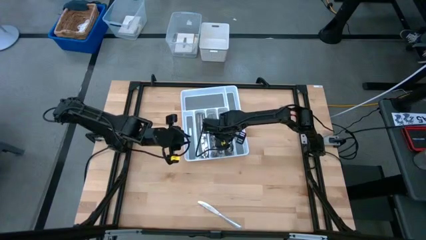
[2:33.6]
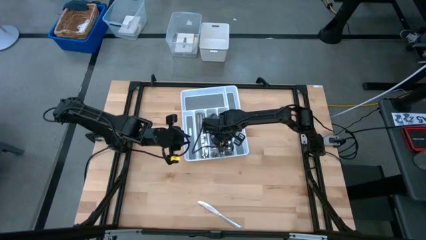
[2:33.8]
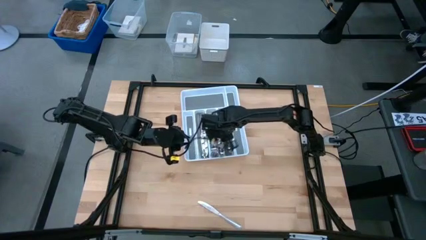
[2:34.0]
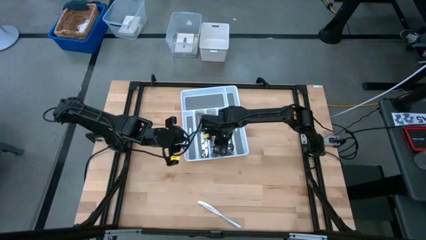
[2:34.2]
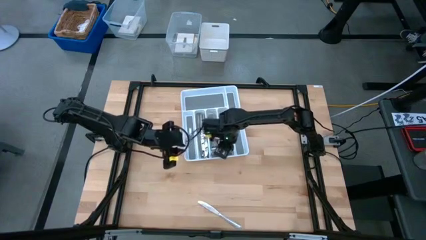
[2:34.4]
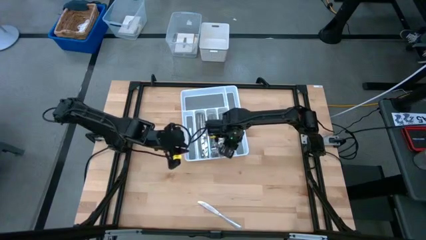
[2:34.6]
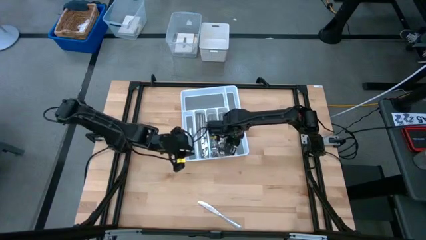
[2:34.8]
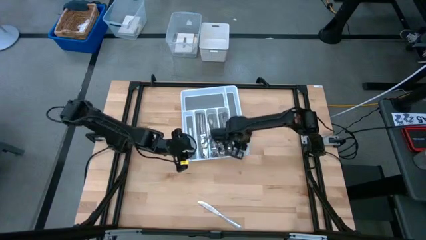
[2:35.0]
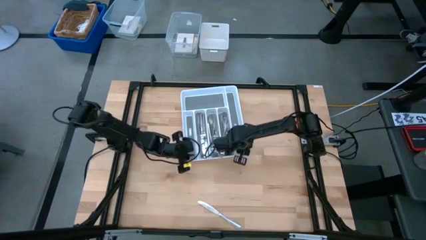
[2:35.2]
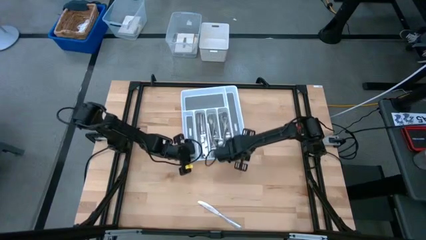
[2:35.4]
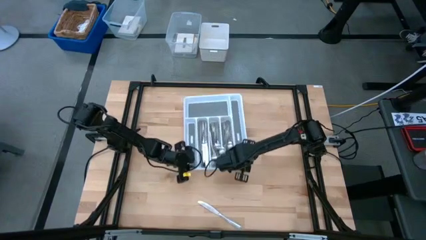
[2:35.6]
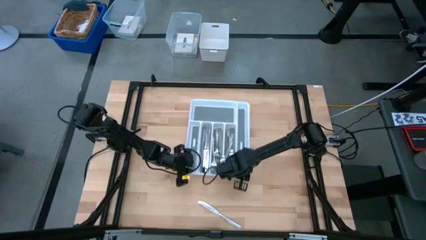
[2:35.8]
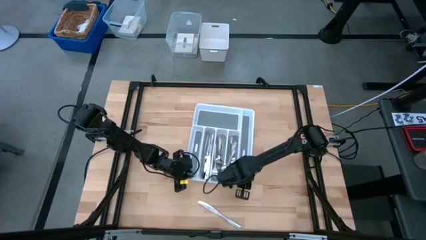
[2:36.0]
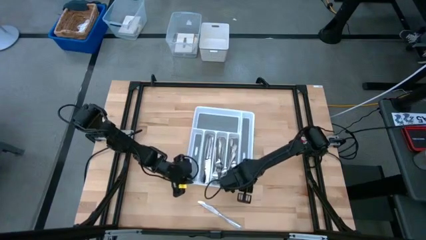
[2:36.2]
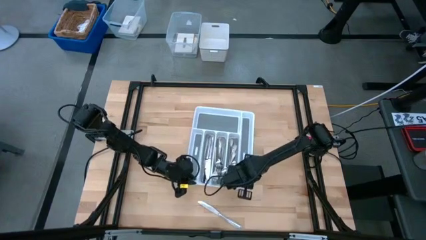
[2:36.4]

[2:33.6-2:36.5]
Task: Sort silverware
Adjust the white cutlery tray

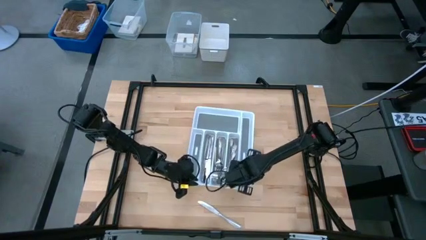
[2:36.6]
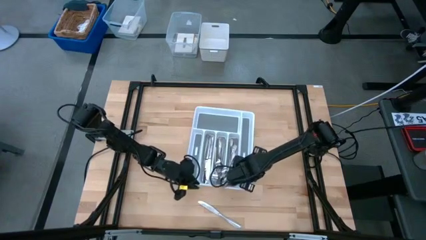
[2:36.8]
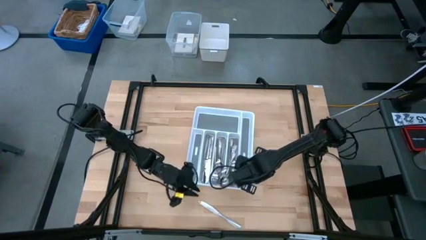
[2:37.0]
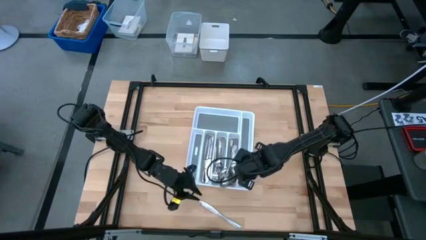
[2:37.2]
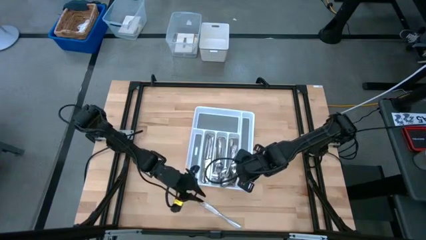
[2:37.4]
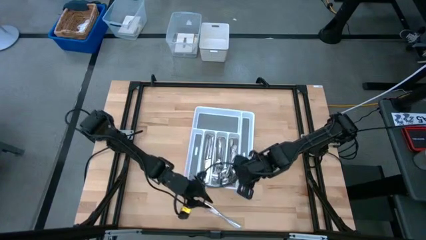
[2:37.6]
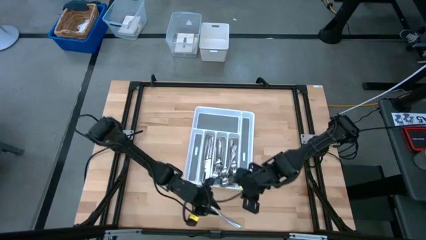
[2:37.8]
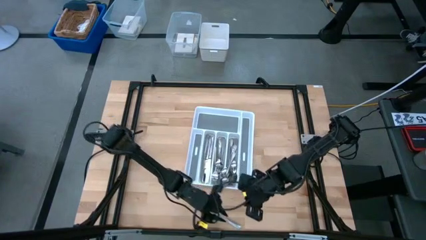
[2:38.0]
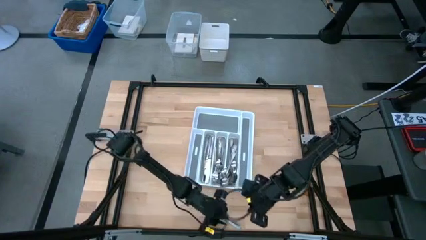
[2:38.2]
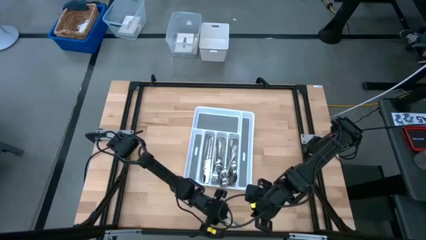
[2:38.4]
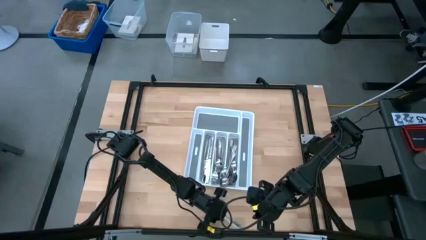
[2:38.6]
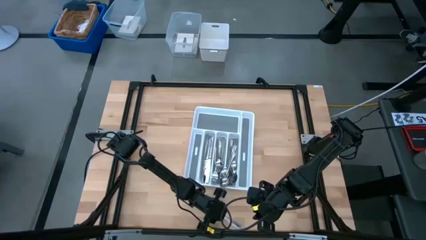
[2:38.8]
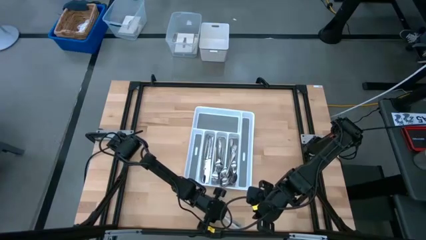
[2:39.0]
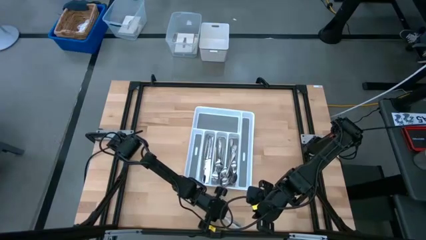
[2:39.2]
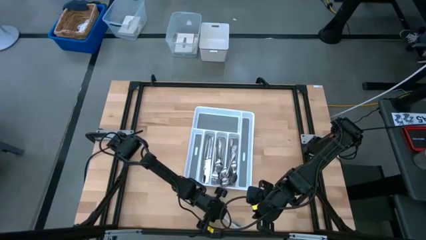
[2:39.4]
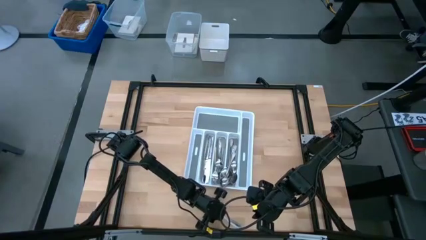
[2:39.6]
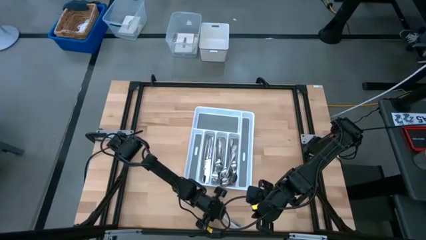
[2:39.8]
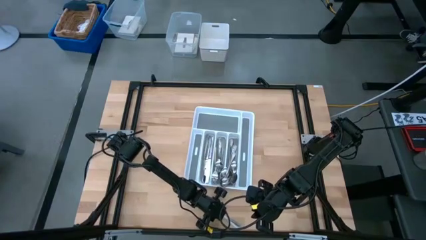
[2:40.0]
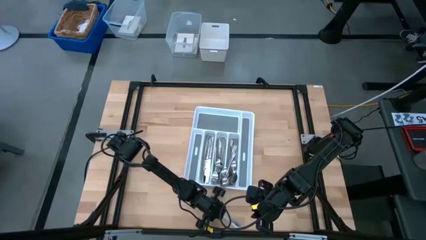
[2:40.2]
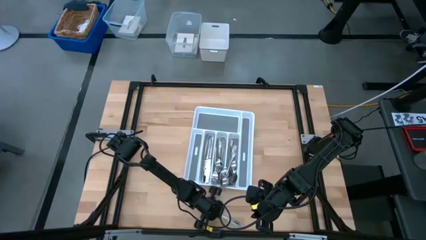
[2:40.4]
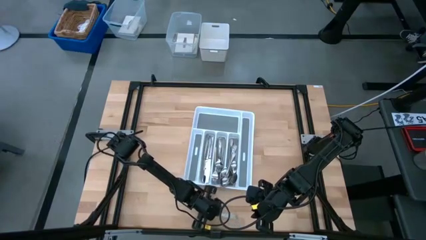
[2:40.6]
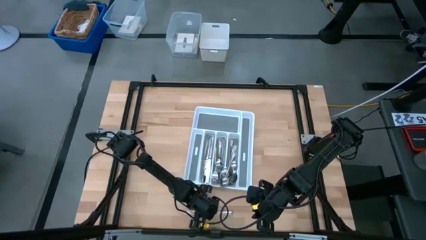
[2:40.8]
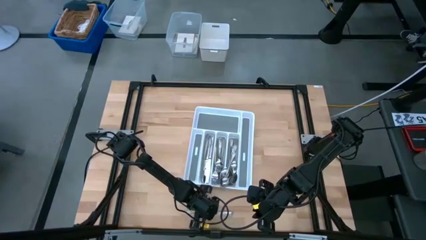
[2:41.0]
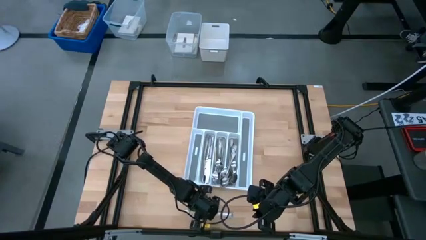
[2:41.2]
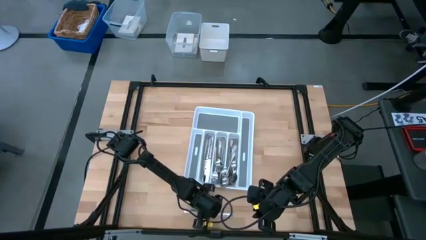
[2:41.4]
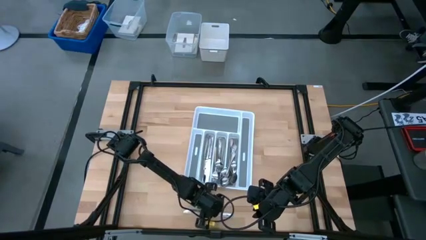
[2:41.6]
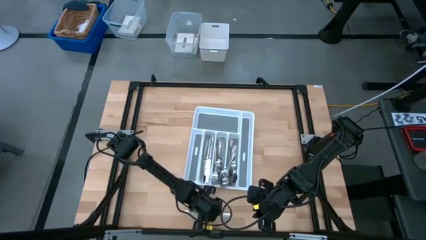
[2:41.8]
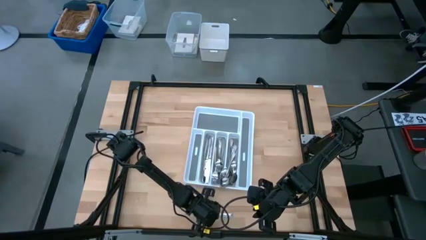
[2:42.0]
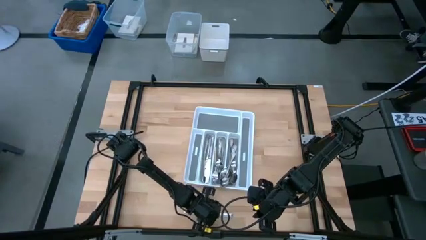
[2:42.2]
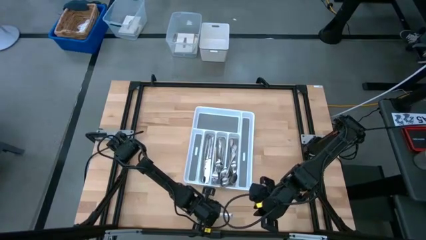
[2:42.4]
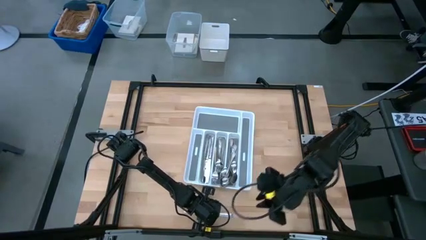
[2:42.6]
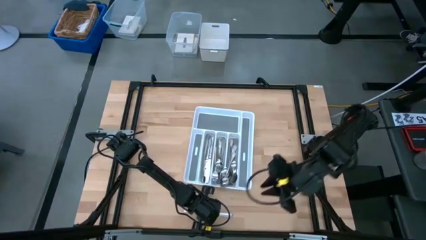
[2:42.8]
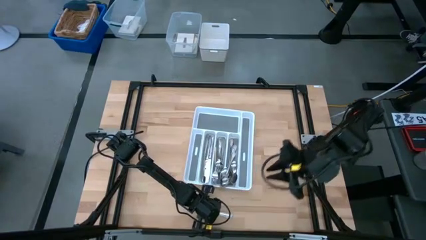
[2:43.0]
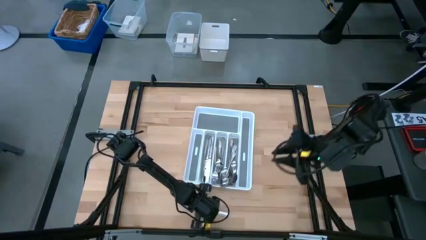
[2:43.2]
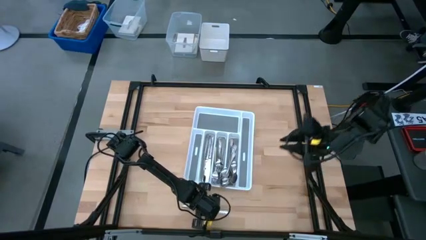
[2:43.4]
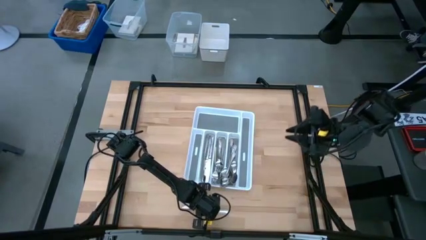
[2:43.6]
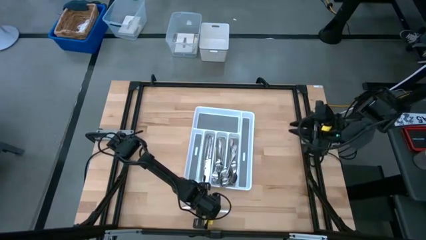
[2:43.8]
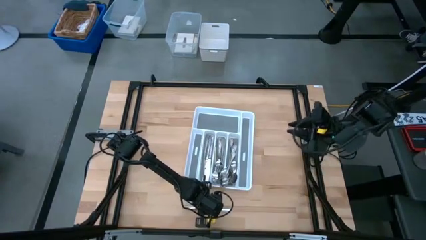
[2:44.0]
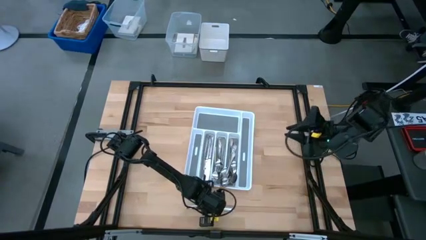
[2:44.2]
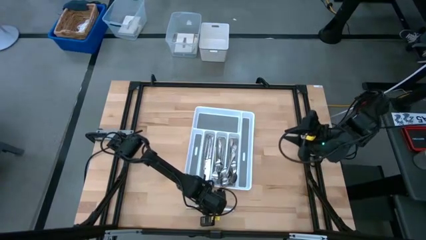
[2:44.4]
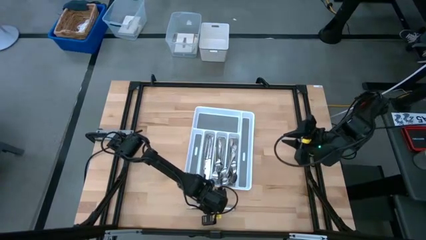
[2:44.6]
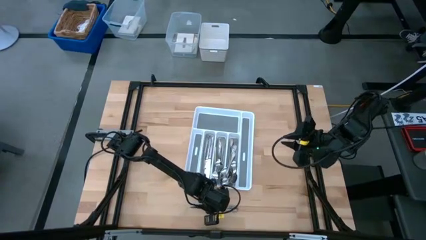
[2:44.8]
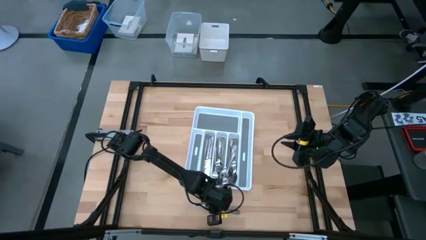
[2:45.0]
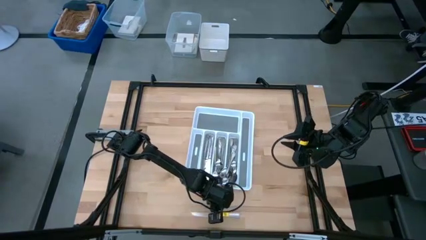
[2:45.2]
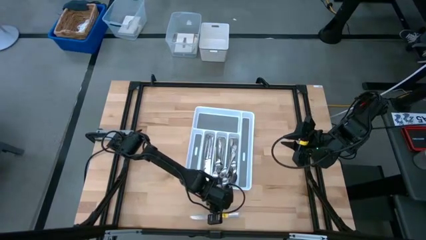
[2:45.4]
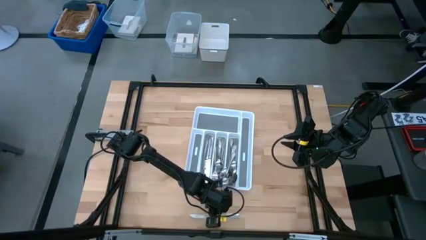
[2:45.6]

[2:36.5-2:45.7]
Put the silver table knife into the white cutlery tray

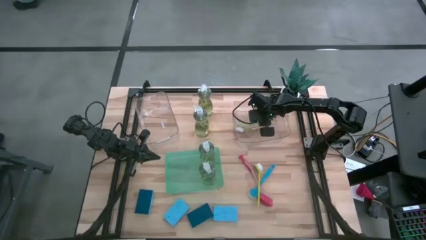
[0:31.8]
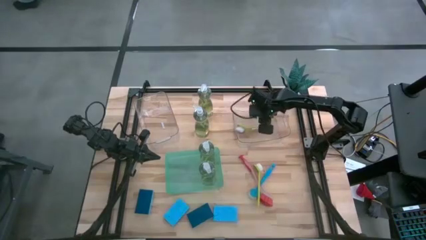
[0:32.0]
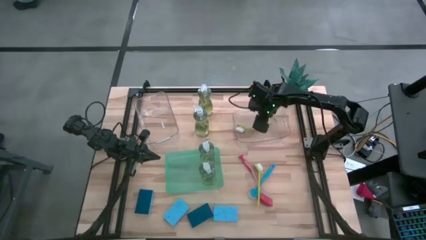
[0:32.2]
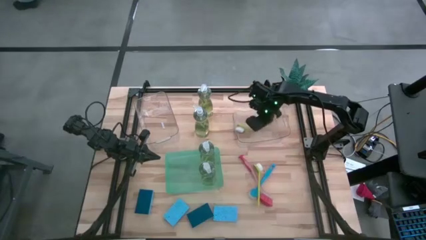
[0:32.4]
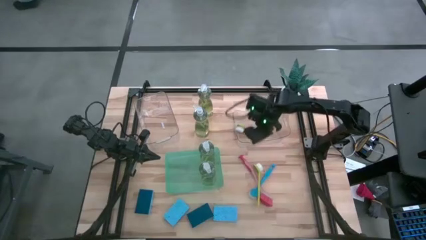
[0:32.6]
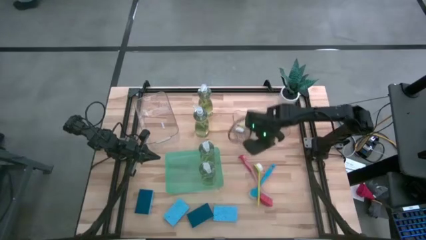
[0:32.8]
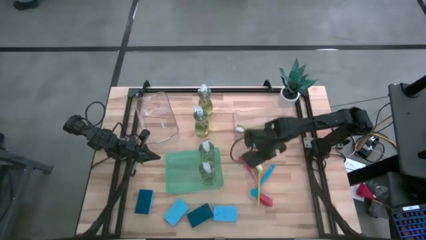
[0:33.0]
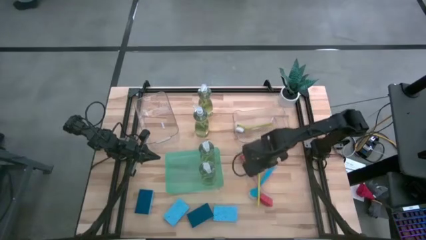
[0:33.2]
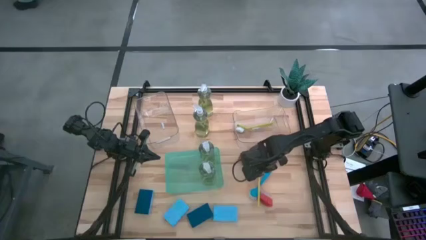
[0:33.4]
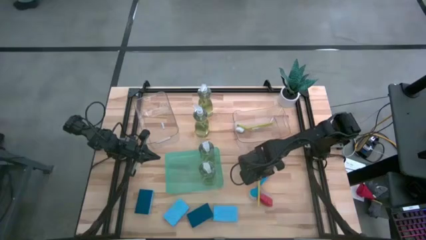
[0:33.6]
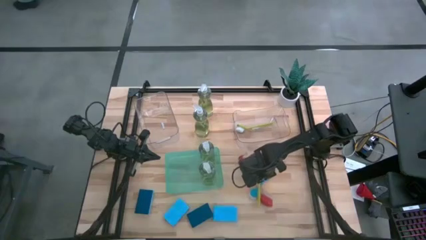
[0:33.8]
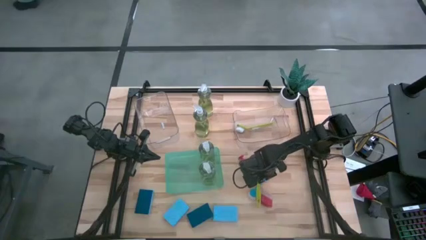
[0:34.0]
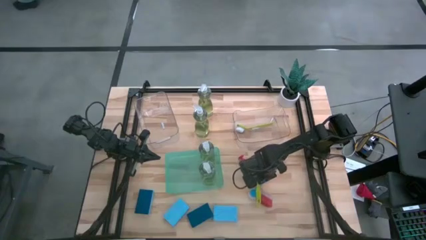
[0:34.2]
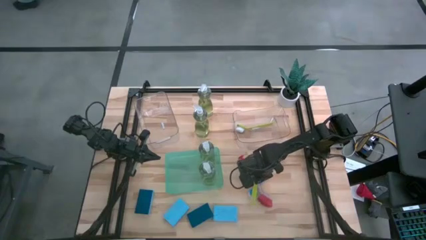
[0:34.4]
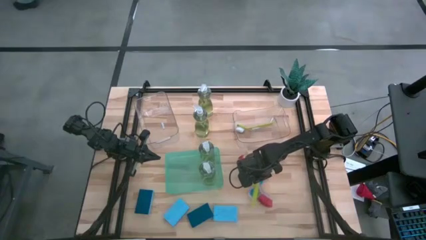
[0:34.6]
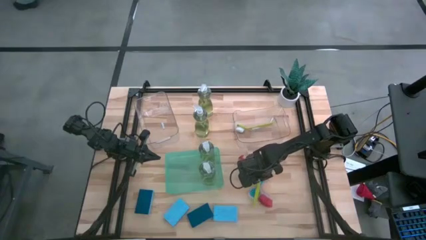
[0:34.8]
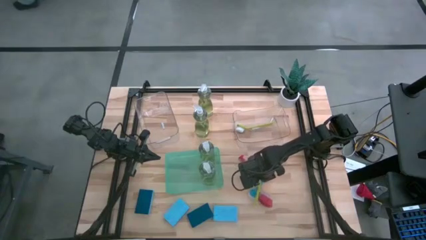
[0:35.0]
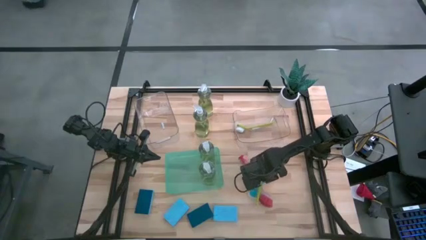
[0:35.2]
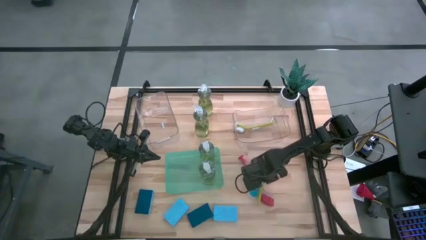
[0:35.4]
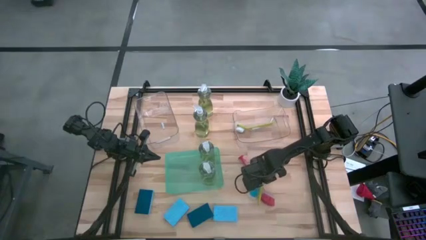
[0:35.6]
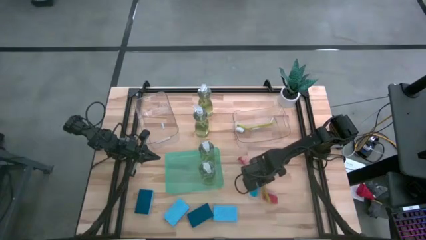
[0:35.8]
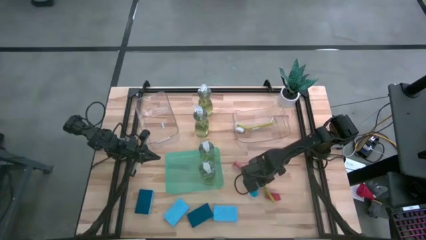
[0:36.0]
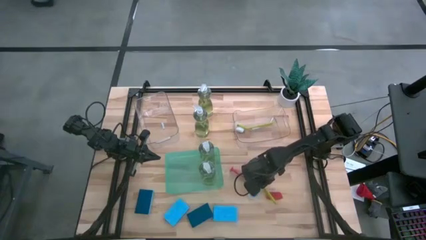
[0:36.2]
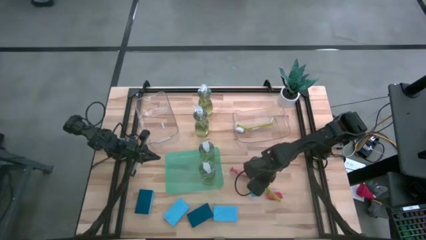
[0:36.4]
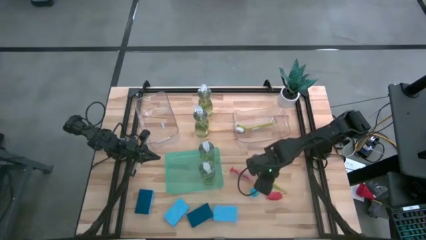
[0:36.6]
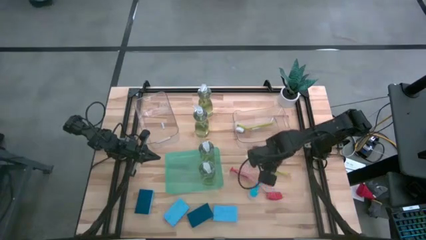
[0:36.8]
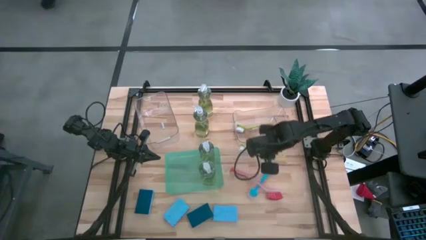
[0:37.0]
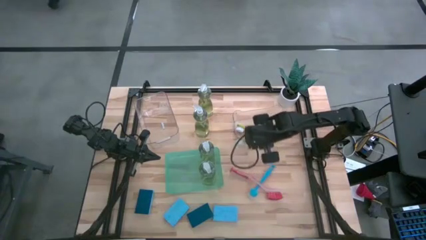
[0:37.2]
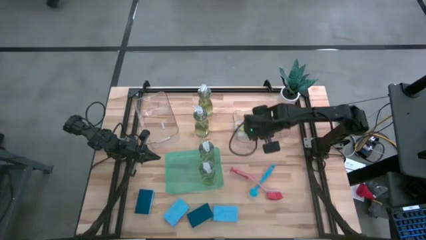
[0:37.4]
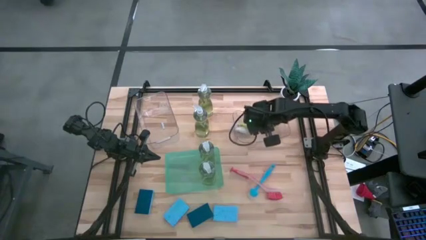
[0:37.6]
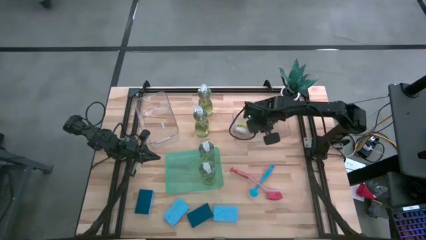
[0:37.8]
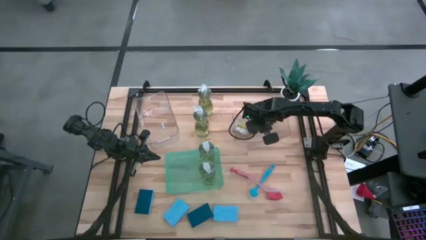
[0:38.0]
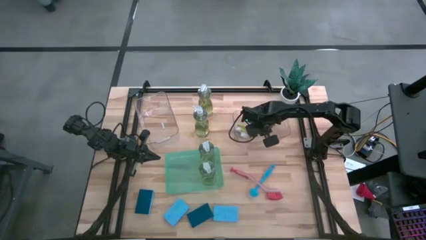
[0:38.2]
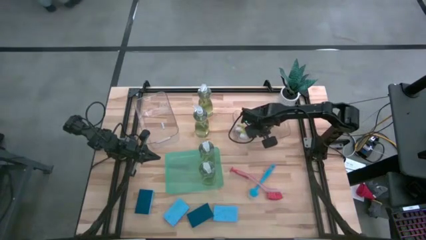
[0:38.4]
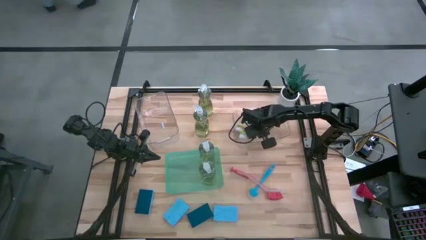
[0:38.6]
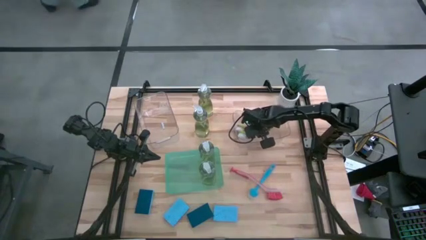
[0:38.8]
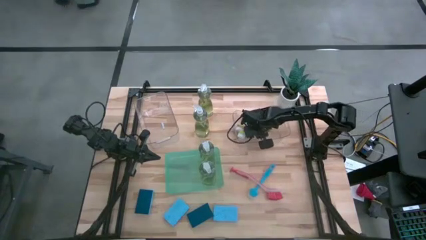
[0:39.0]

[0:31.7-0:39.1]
Task: Pick & Place Kitchen Sink Supplies
Put the yellow dish brush into the right transparent bin
